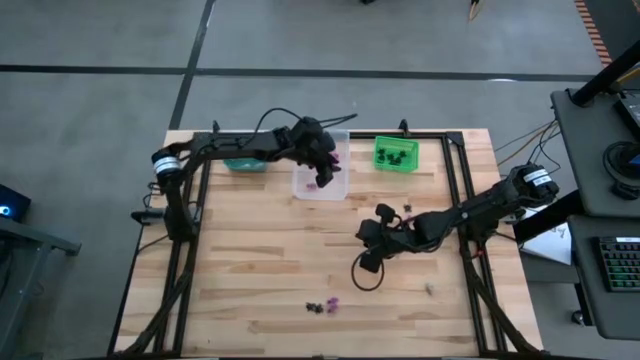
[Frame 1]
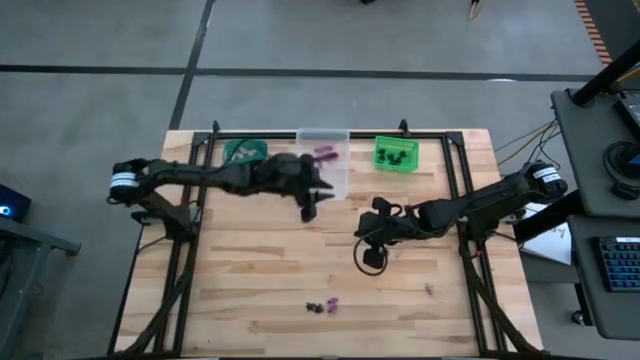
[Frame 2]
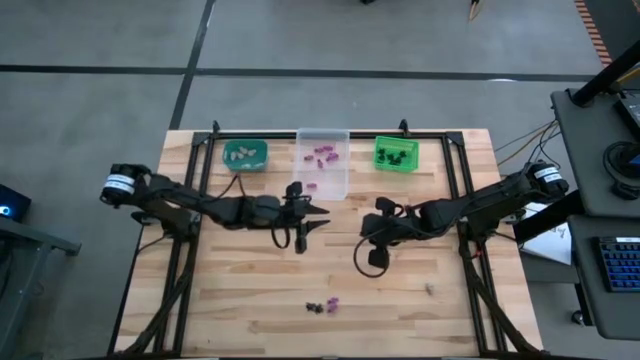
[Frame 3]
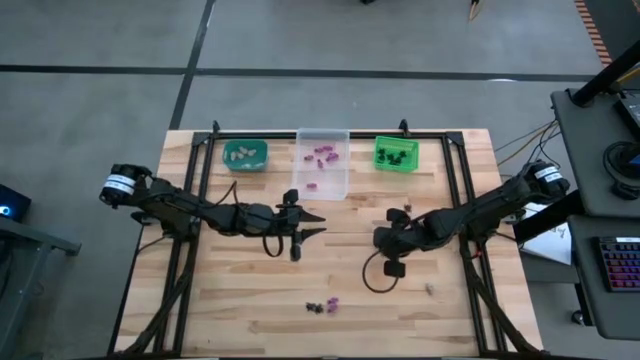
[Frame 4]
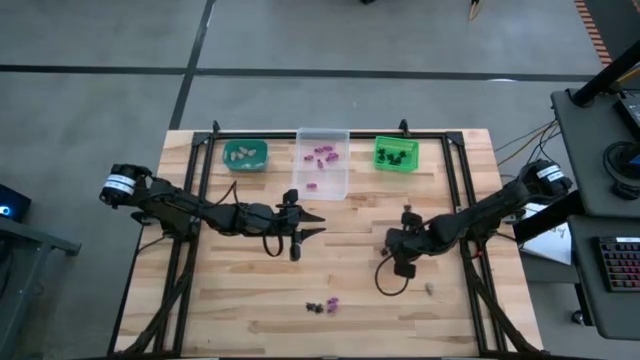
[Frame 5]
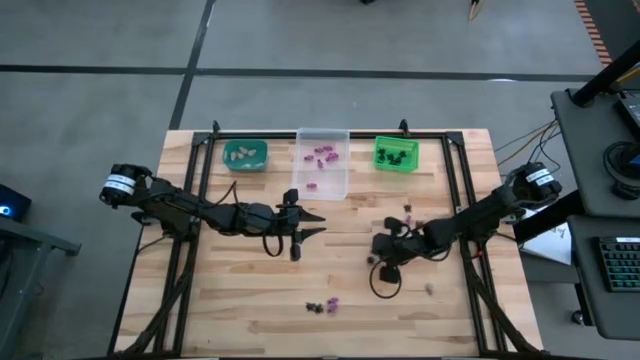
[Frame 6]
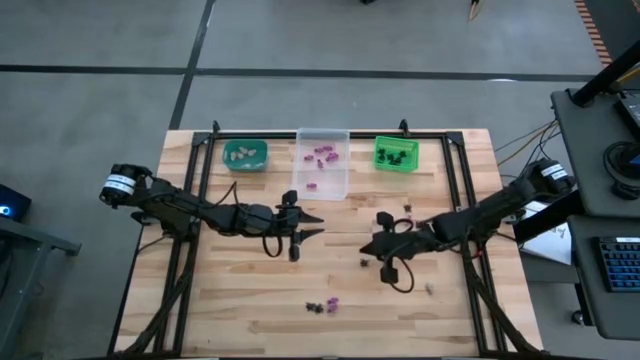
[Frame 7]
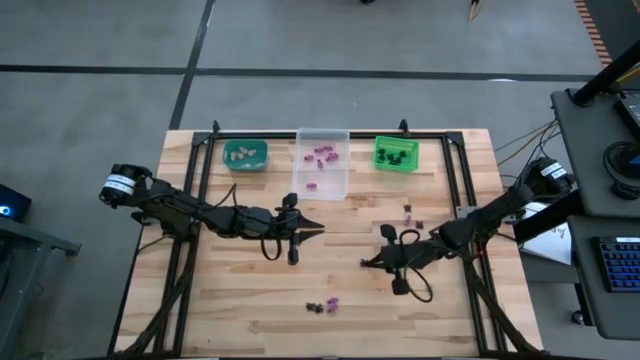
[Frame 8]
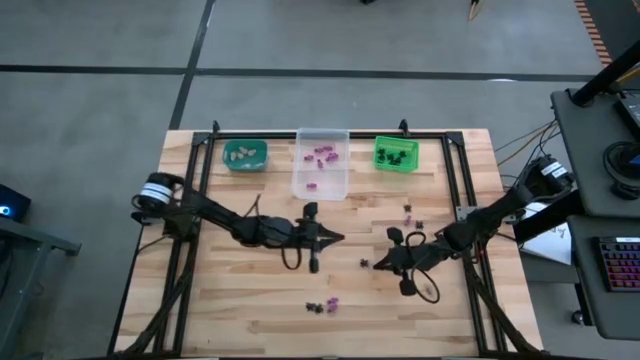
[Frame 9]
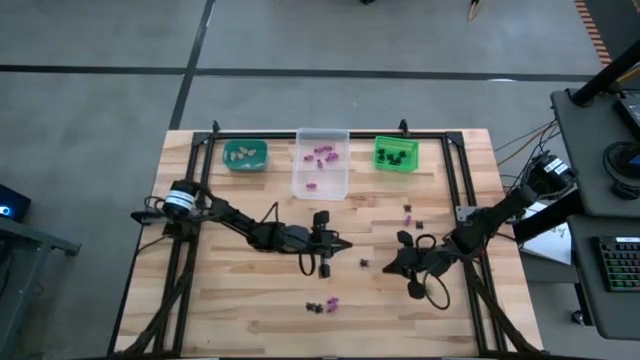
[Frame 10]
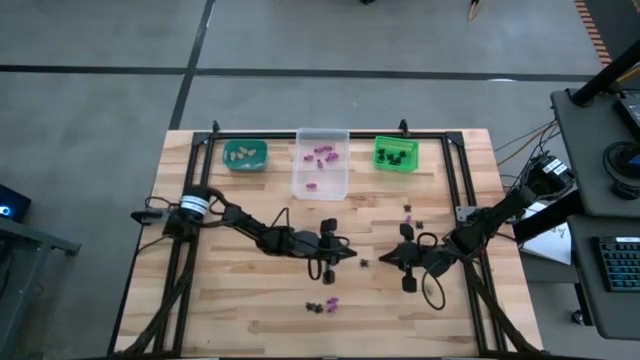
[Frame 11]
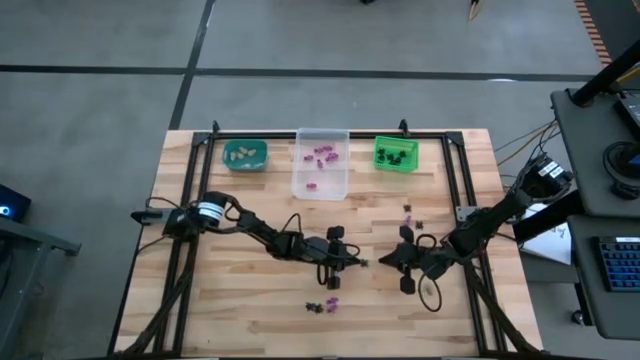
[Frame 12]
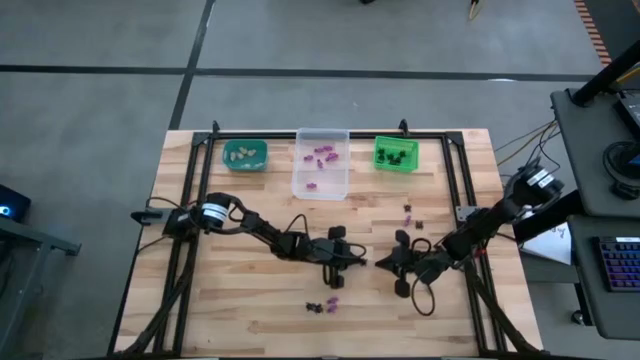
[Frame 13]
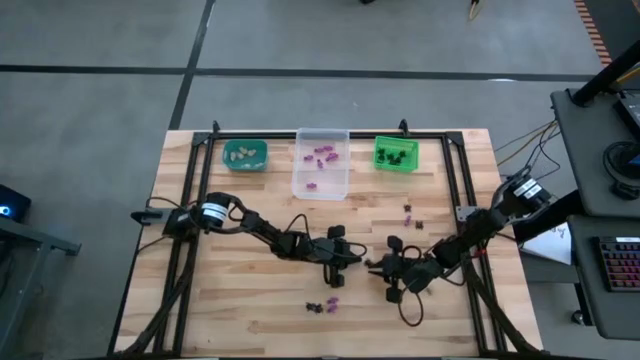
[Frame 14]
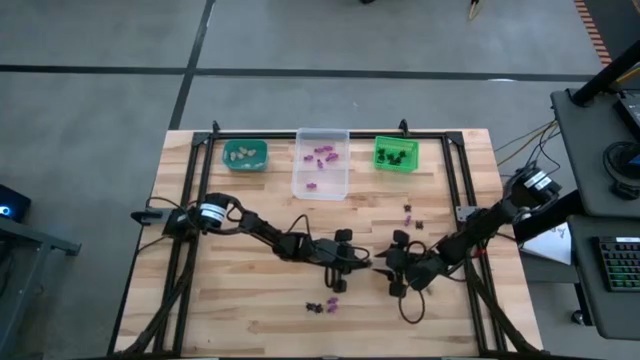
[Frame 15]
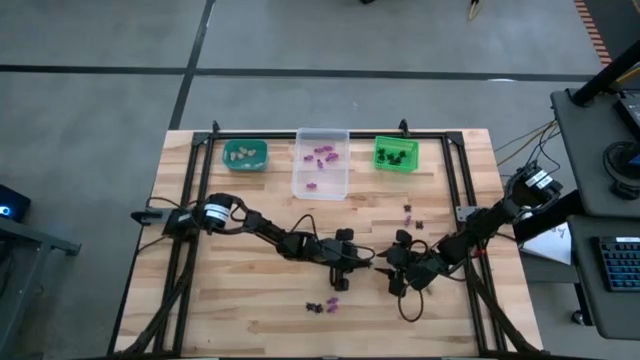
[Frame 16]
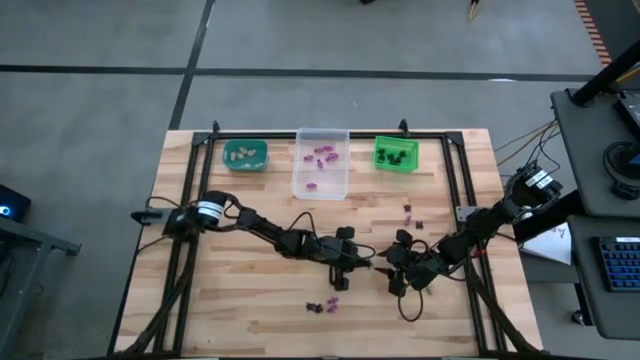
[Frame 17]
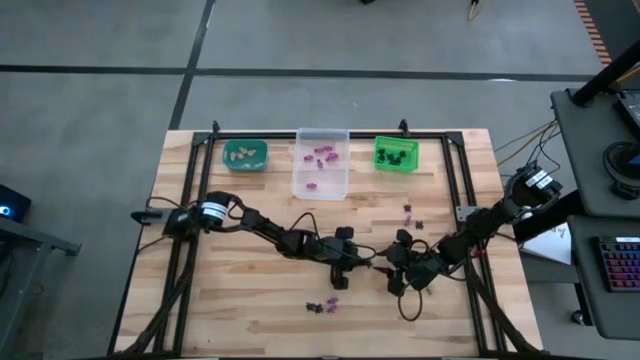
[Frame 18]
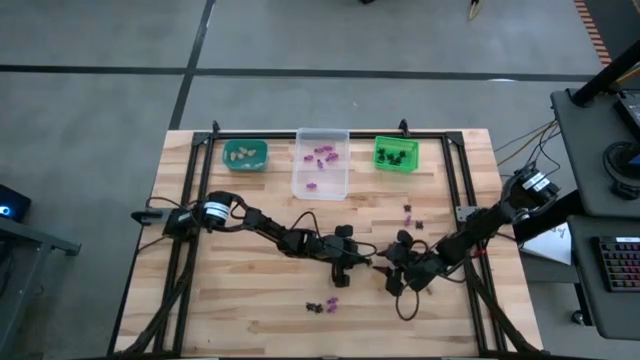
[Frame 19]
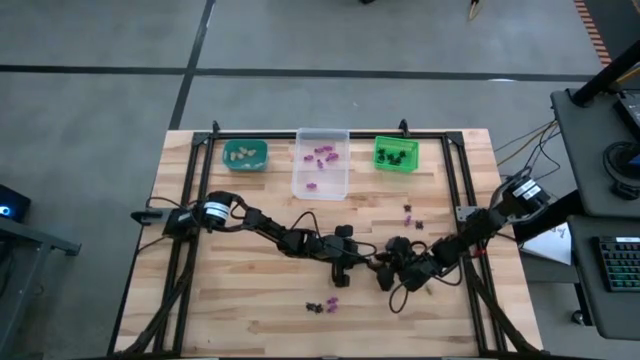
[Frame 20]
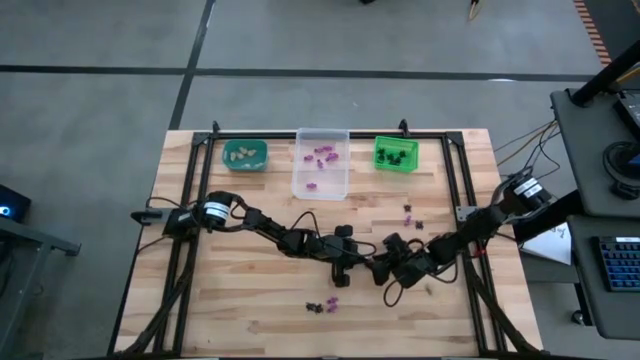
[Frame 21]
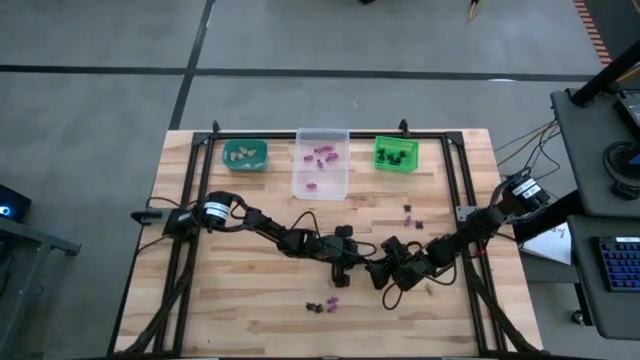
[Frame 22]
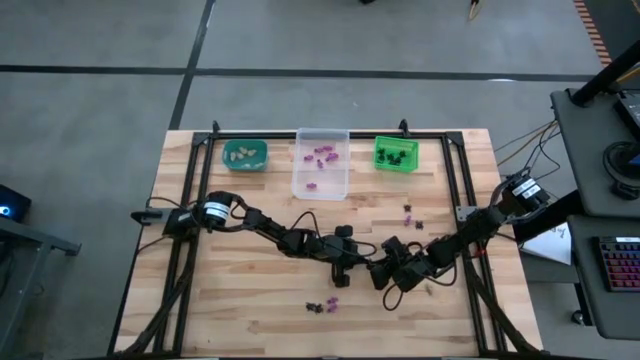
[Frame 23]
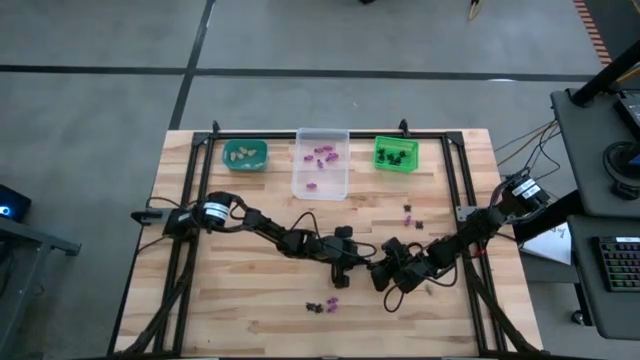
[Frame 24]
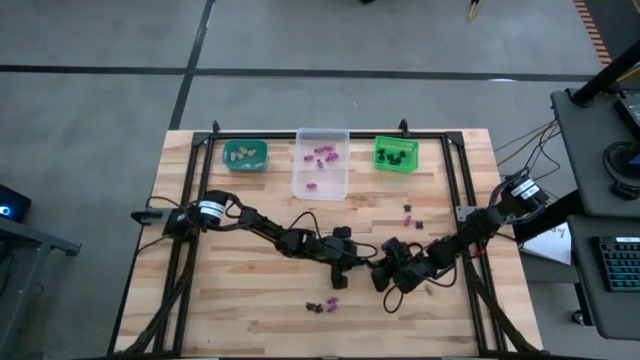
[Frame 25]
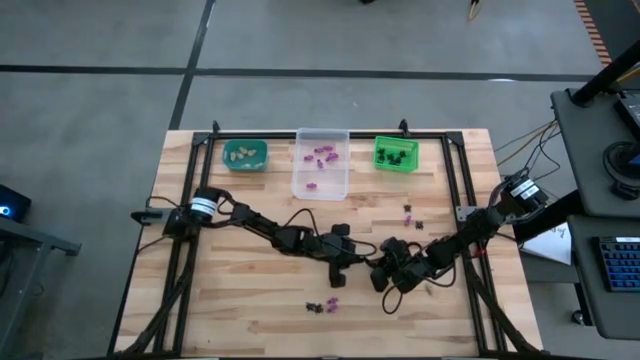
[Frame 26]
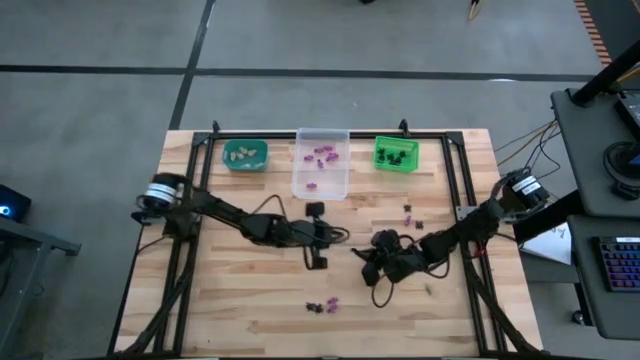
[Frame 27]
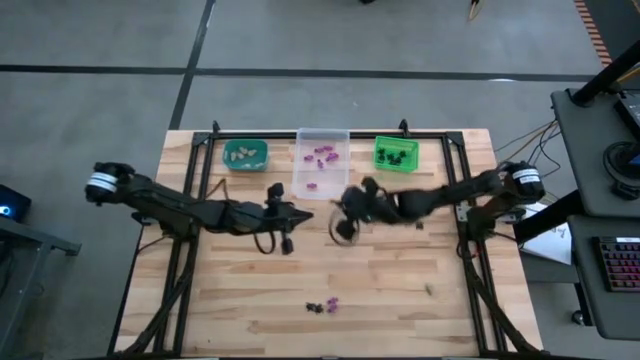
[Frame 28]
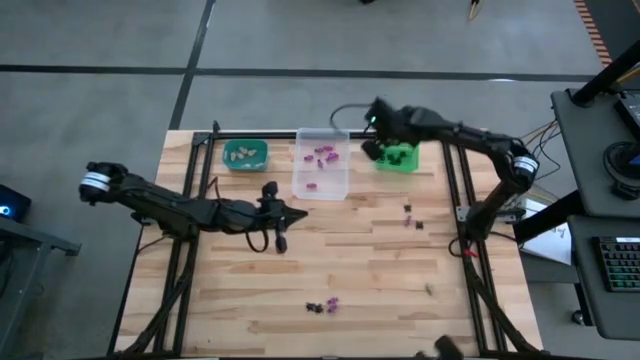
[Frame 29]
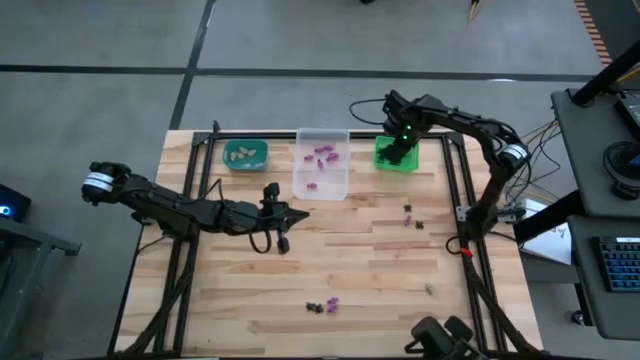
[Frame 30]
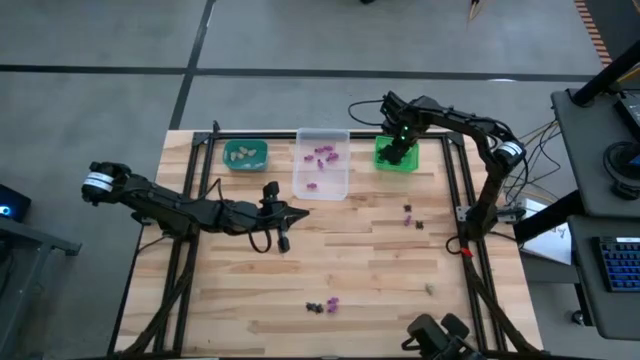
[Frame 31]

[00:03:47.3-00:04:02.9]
Task: Sort Halloween decoration
Put the black spider toy into the green bin

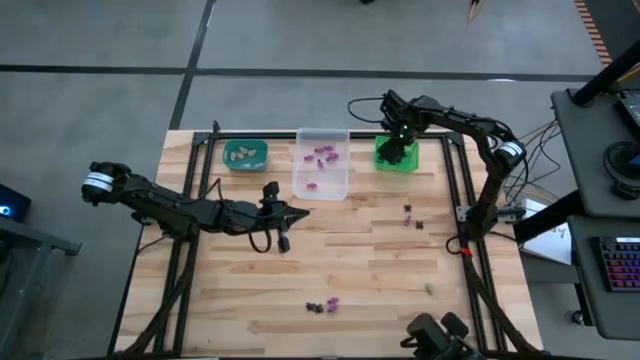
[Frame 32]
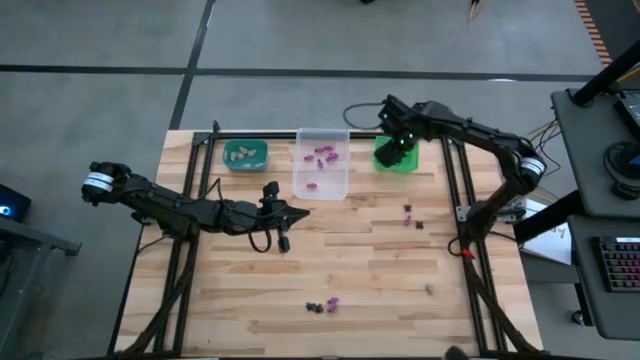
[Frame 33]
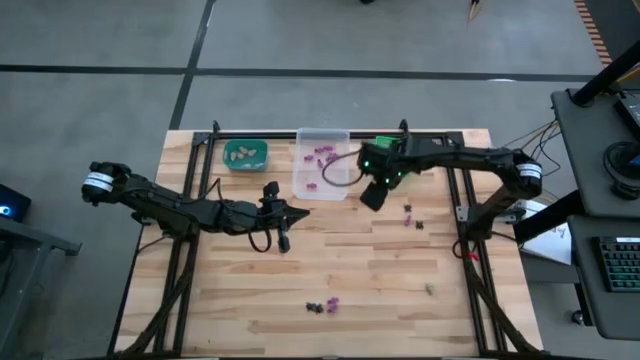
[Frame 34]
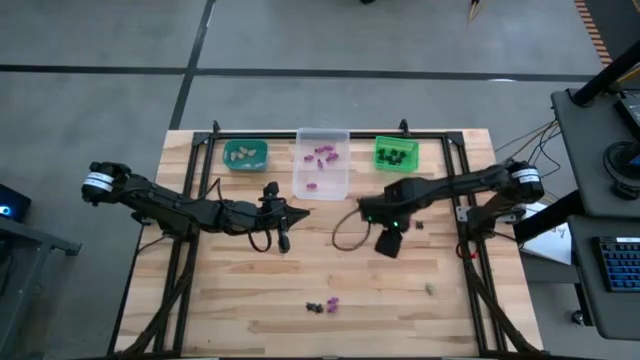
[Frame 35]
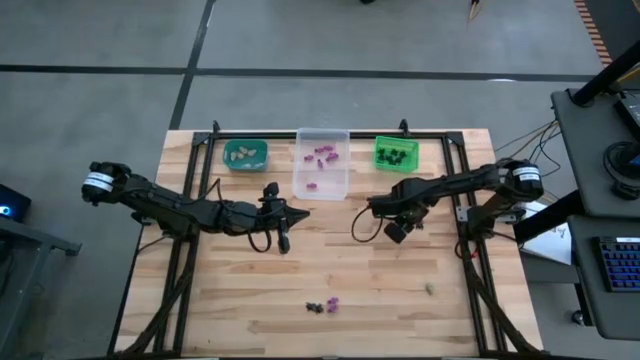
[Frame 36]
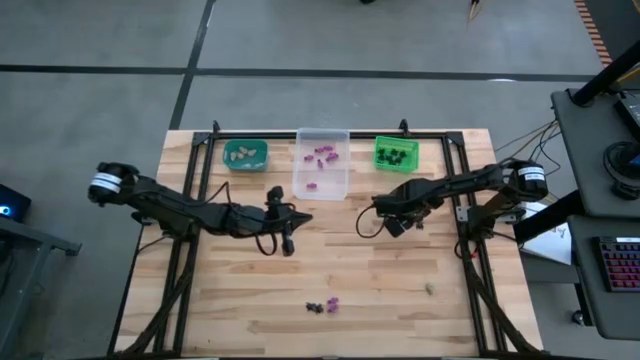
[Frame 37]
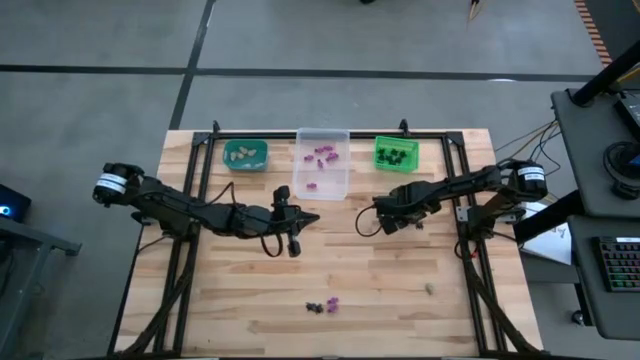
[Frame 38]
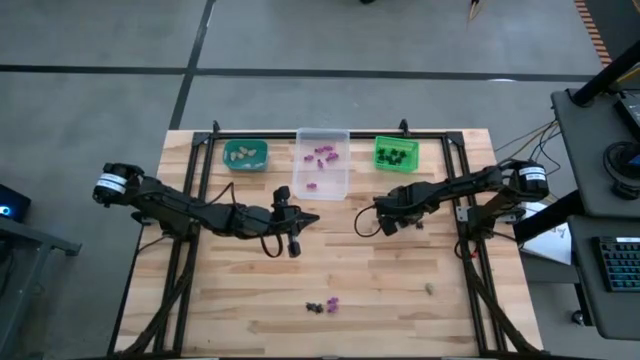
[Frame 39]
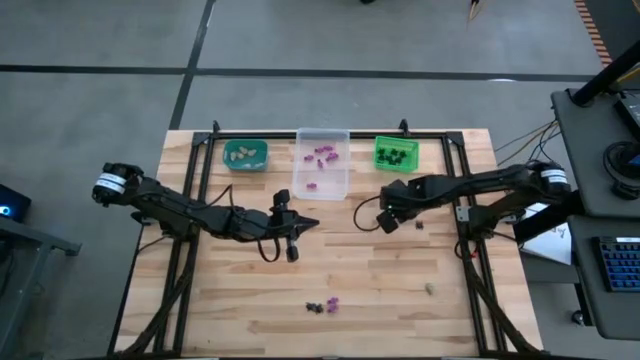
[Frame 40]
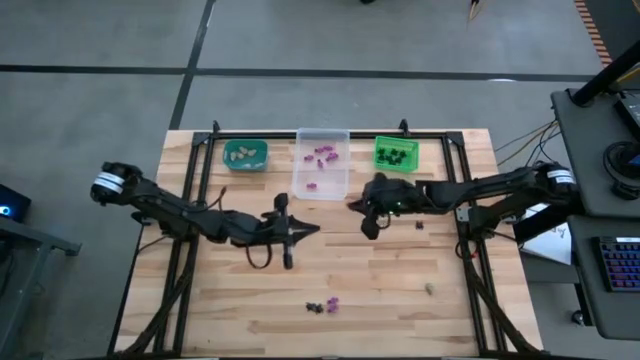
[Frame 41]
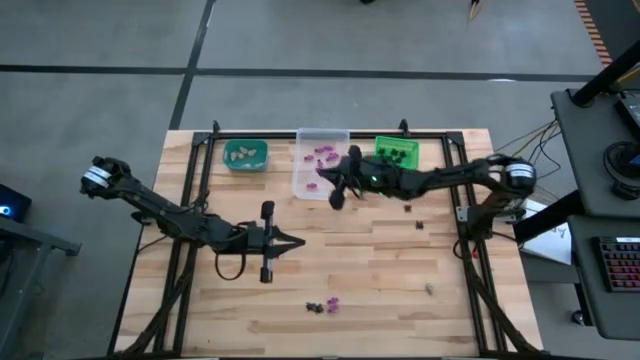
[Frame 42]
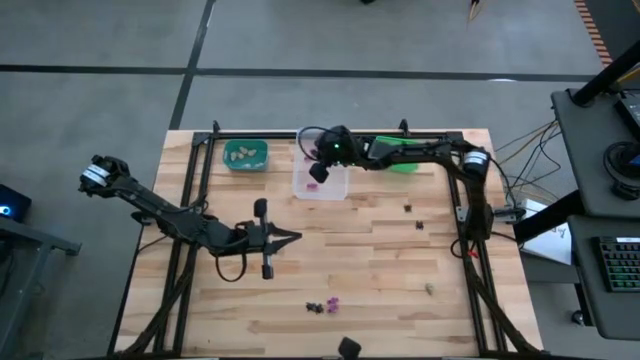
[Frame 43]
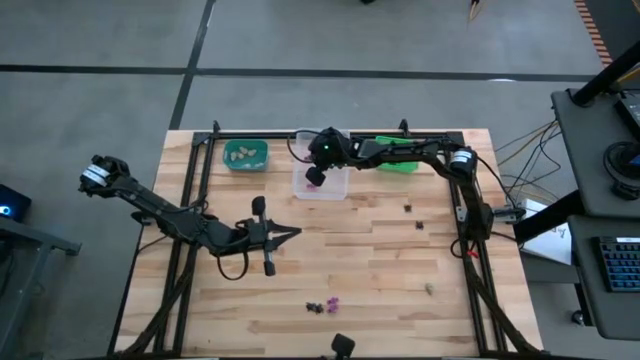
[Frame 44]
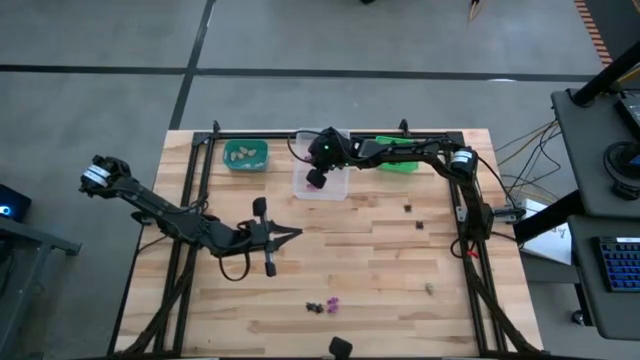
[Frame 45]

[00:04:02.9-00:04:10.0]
Put the violet skeleton toy into the transparent bin
